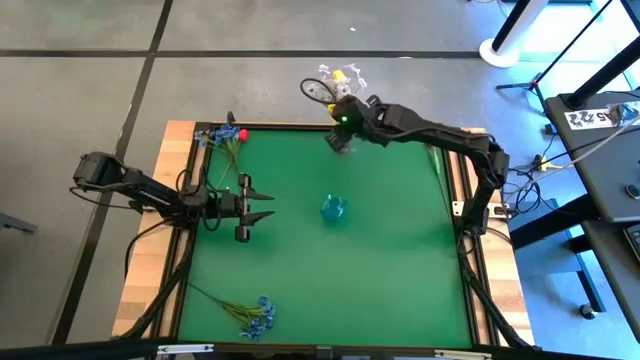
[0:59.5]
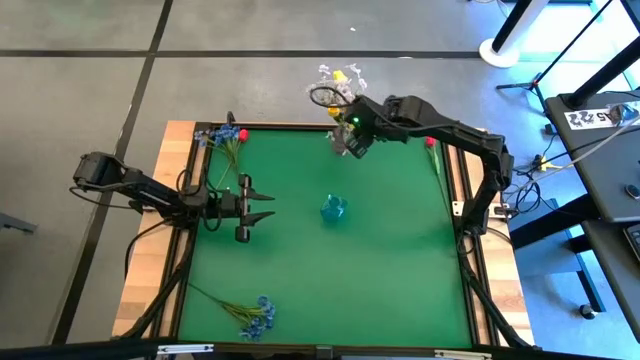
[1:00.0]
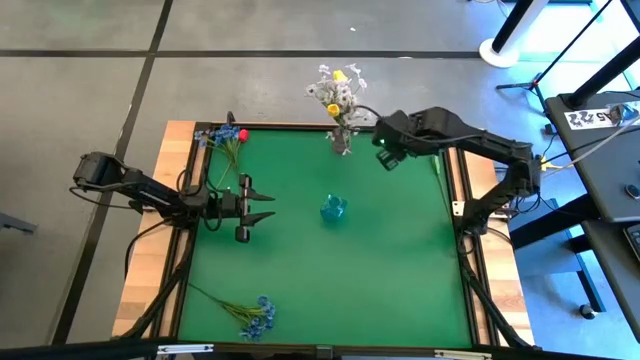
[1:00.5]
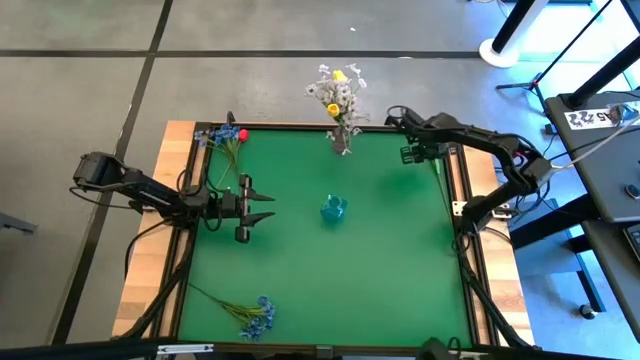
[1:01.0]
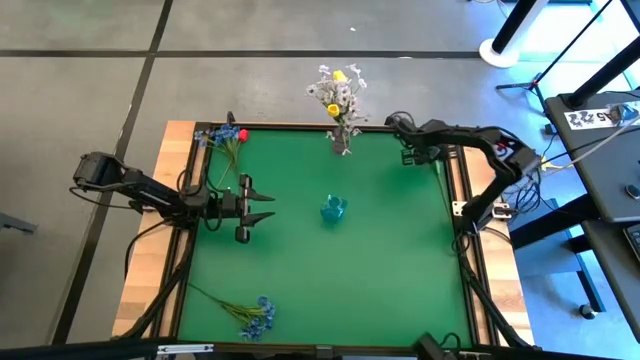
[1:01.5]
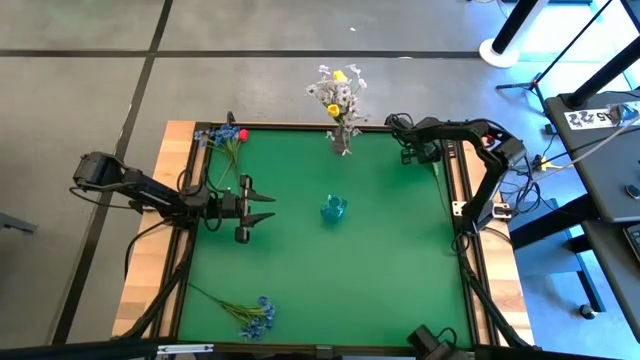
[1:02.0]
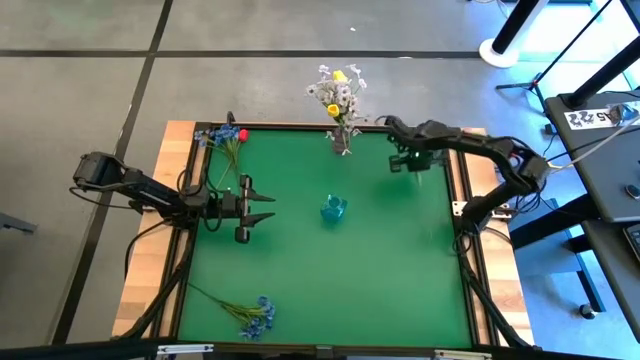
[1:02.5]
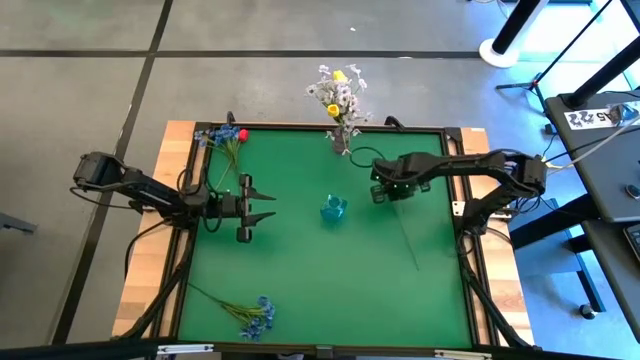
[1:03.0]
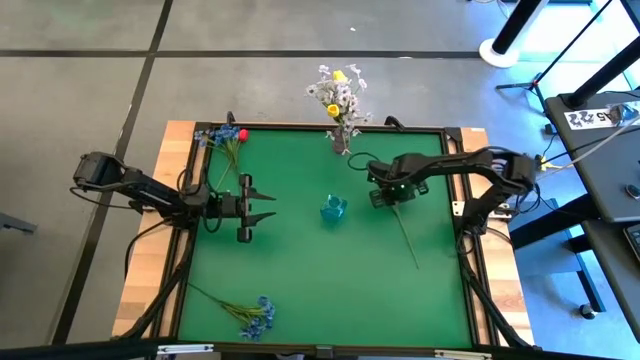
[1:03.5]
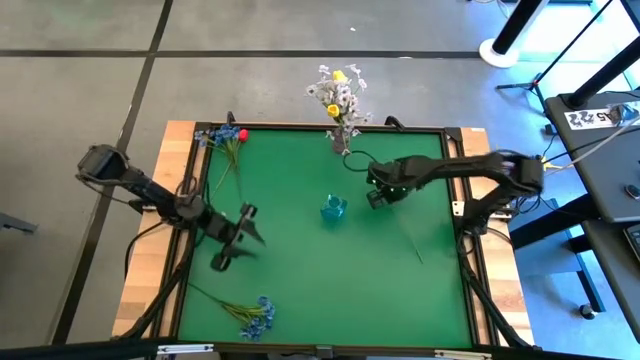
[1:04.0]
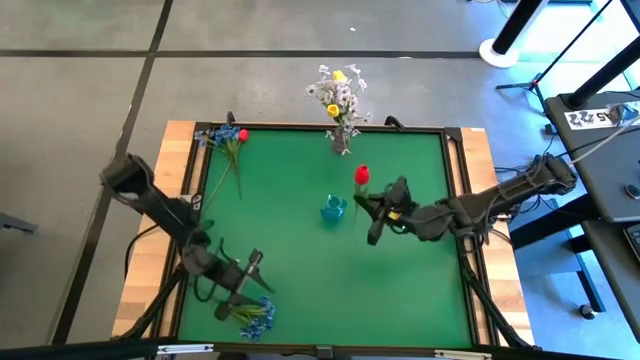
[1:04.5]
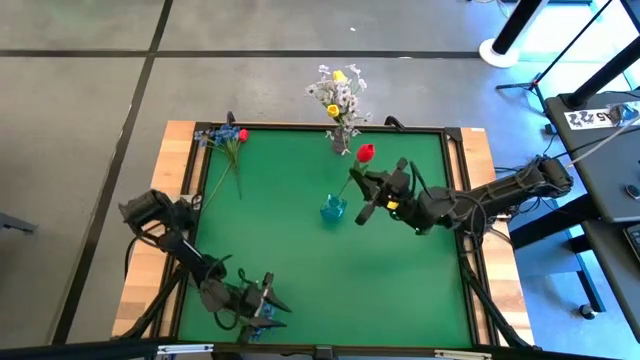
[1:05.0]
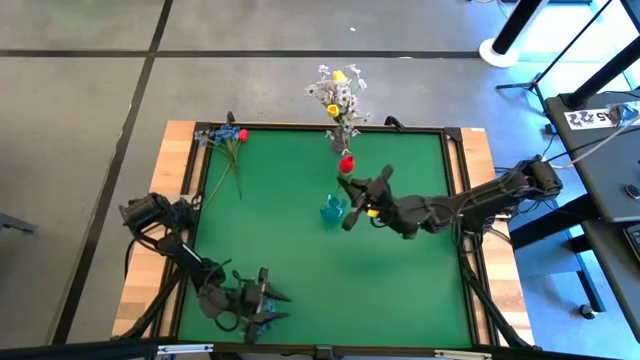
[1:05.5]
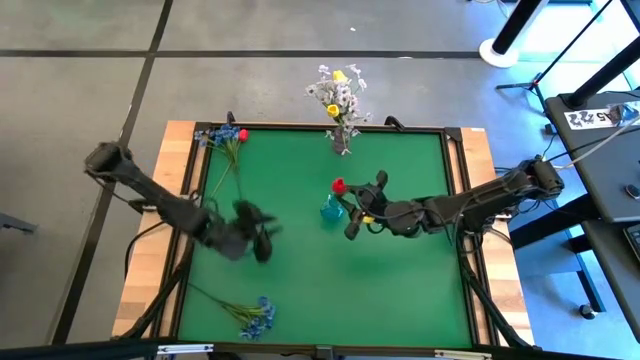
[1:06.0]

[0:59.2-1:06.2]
Task: Sort flowers into vase by color
Put the right red tulip into the blue vase

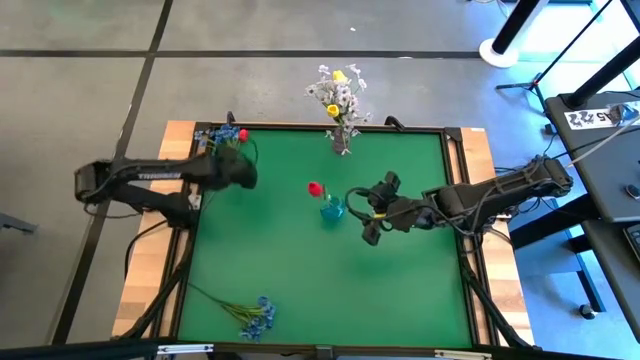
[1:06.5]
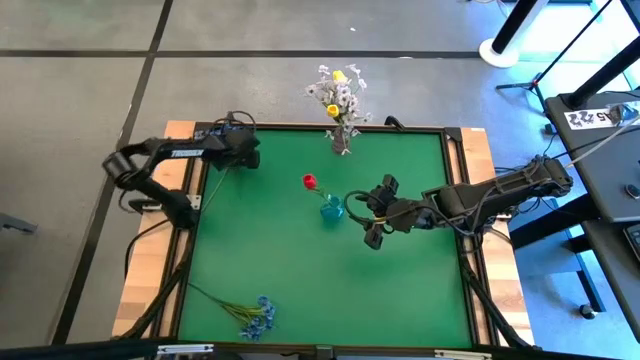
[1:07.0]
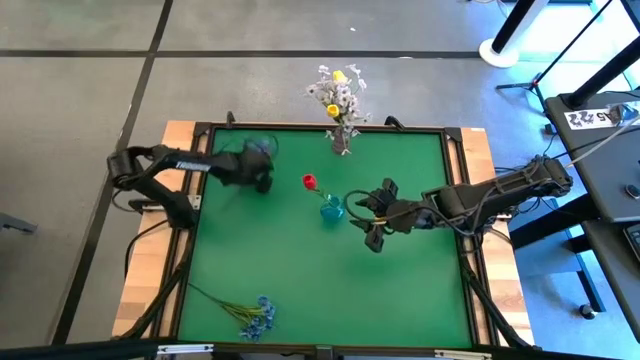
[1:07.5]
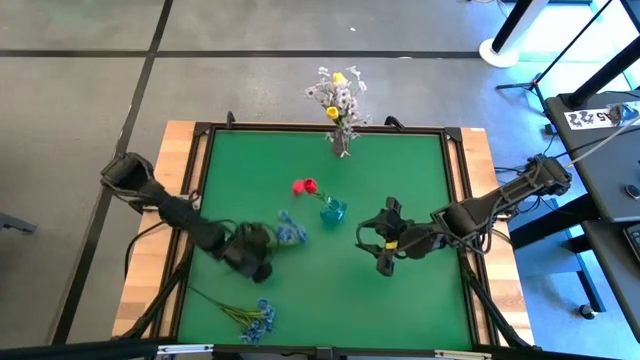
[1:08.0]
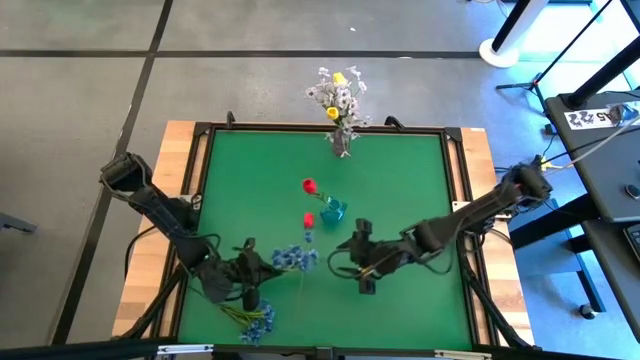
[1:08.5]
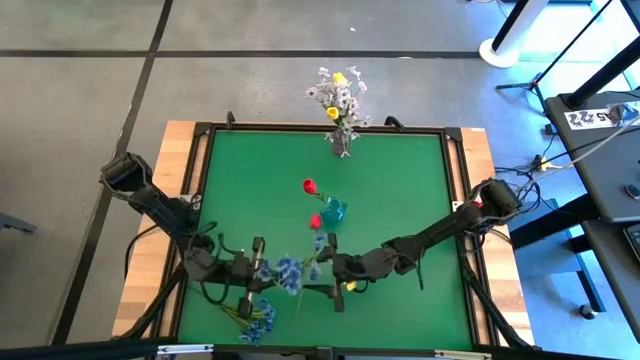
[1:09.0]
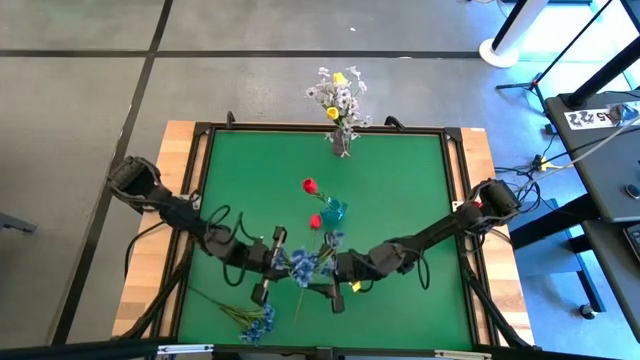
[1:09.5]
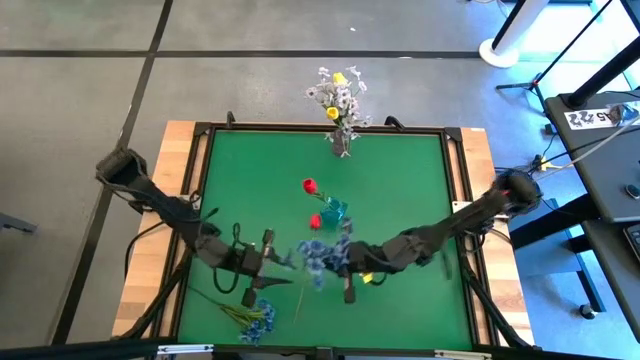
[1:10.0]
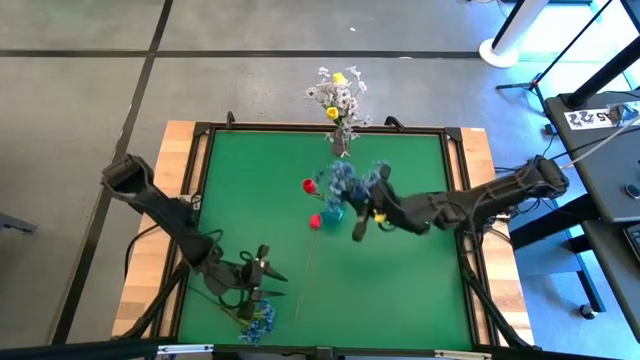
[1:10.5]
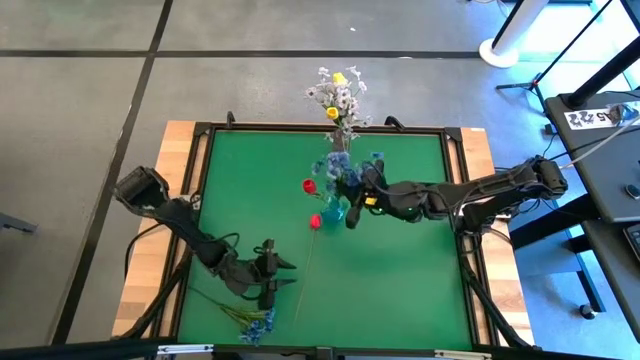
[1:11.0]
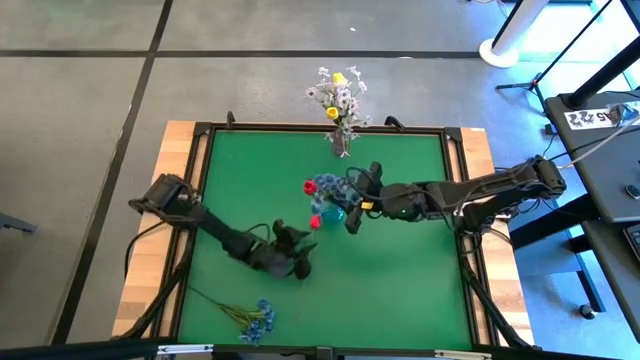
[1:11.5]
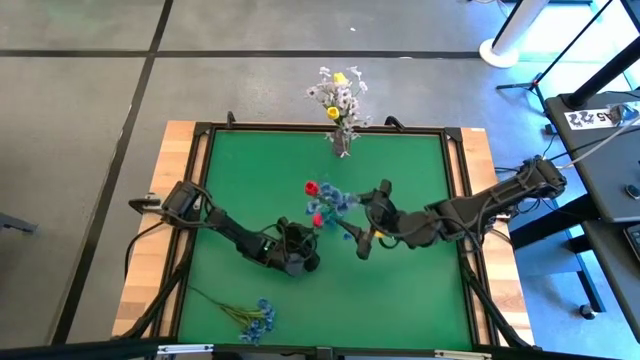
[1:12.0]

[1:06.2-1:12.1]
Put the top blue flower into the blue vase

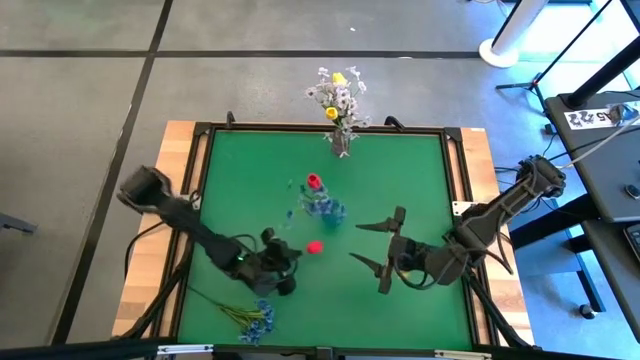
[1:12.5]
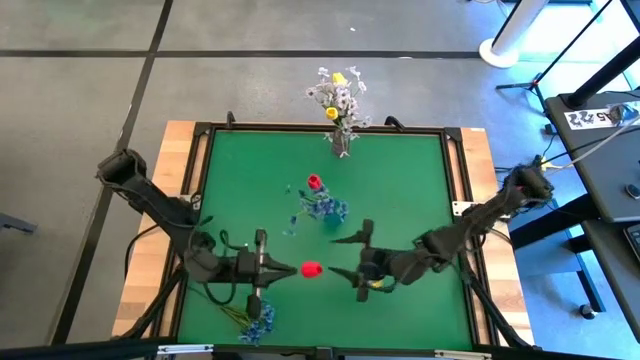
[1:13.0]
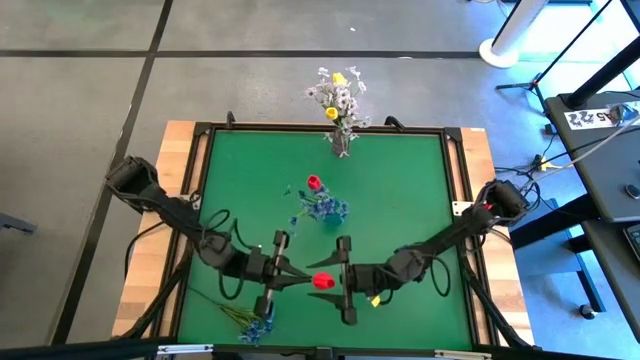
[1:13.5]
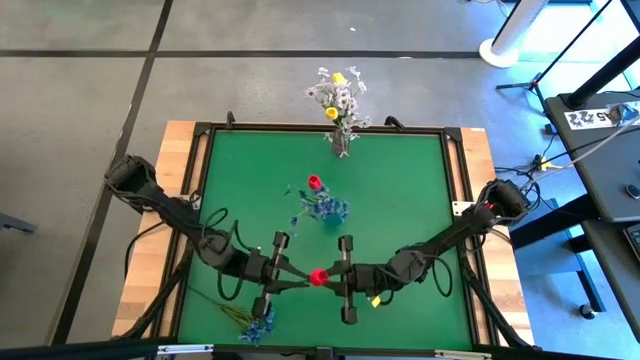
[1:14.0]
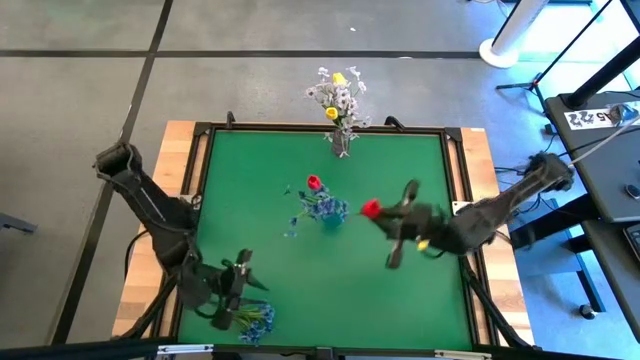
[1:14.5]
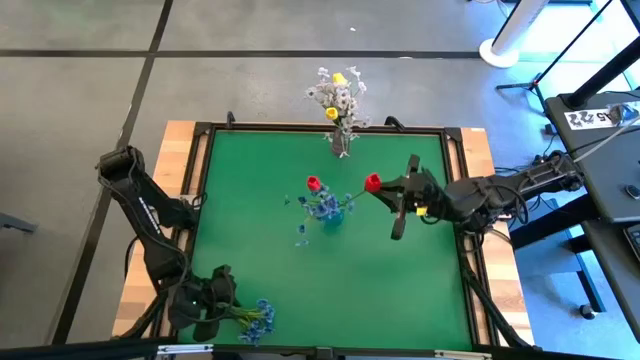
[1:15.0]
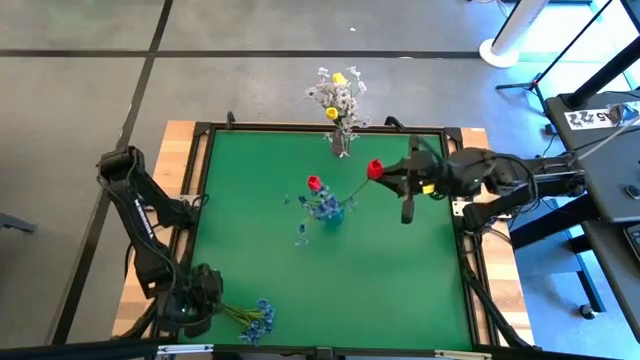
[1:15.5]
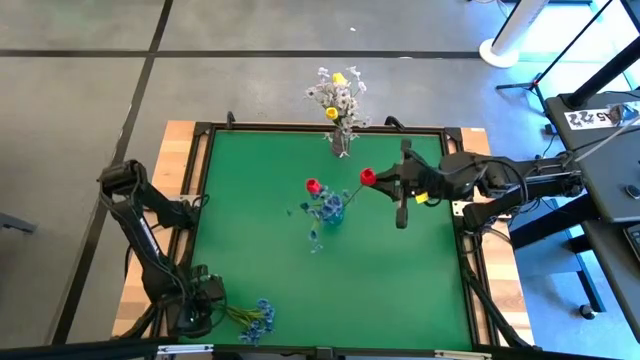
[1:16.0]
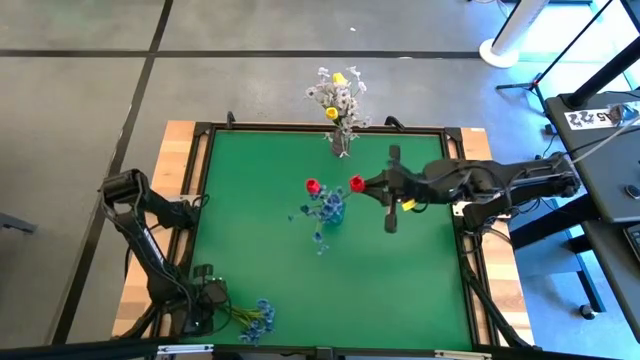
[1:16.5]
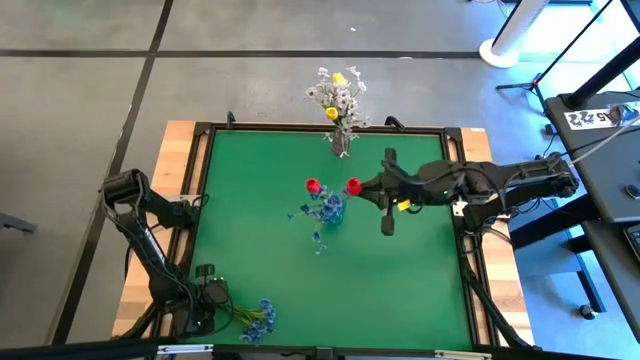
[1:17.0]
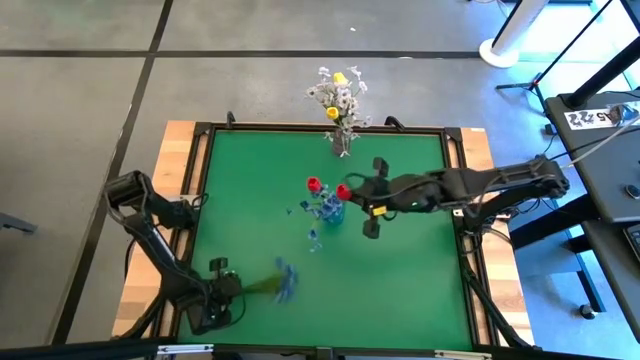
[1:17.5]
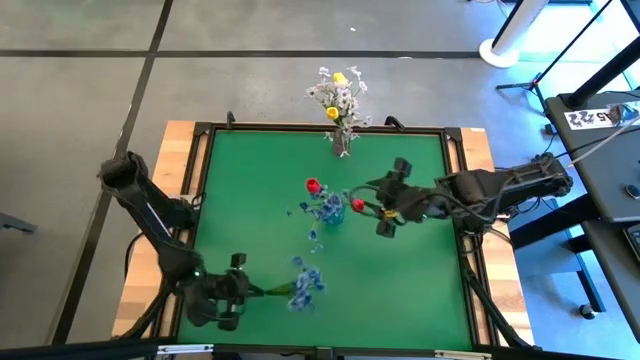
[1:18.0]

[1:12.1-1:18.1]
Put the red tulip into the blue vase

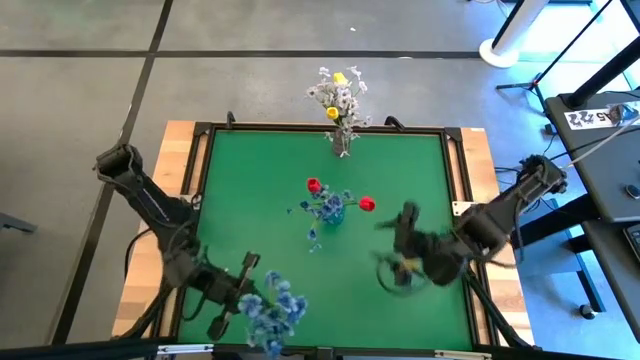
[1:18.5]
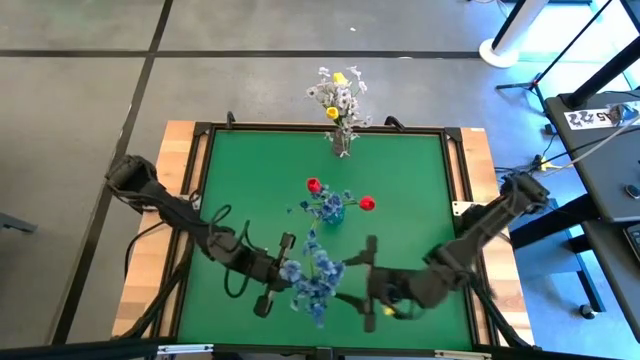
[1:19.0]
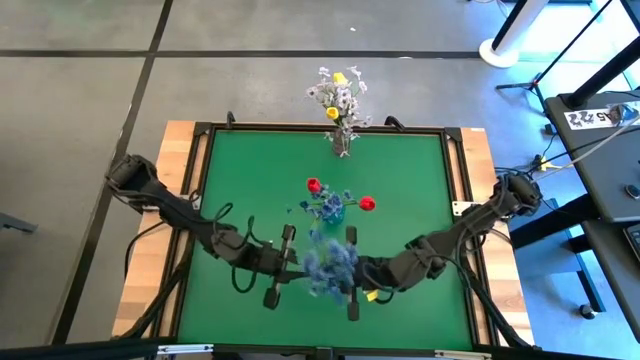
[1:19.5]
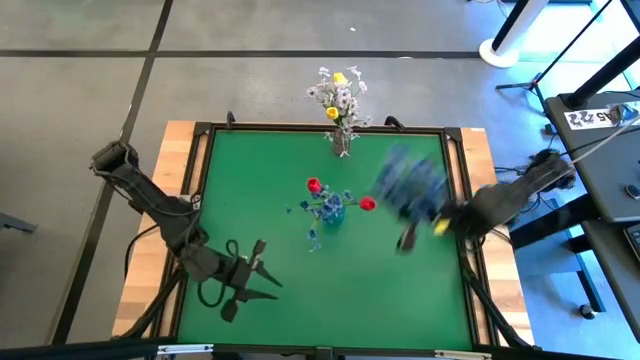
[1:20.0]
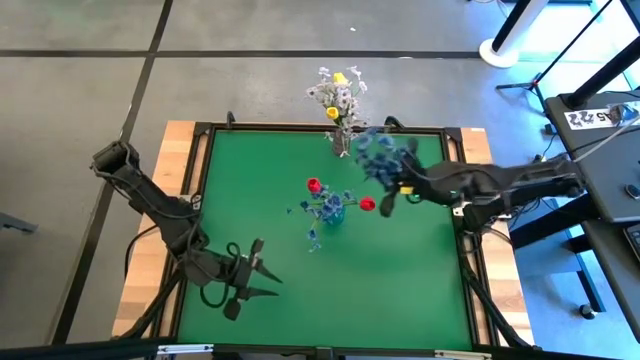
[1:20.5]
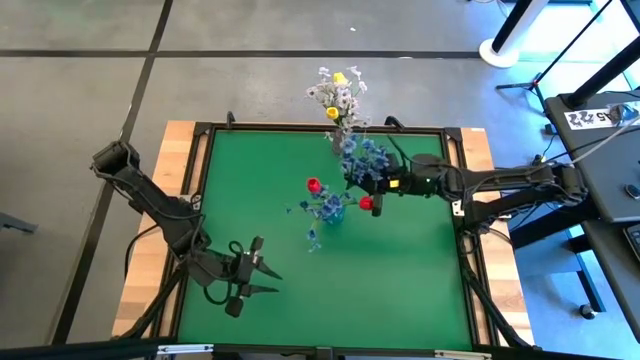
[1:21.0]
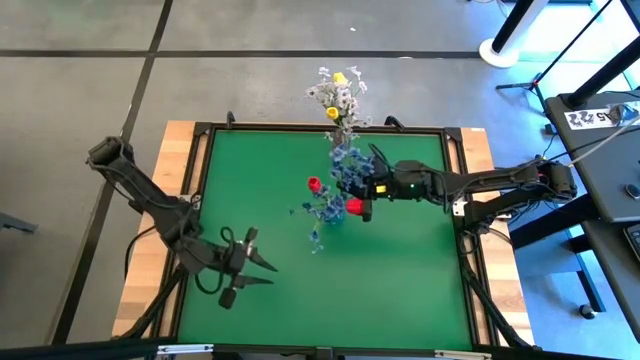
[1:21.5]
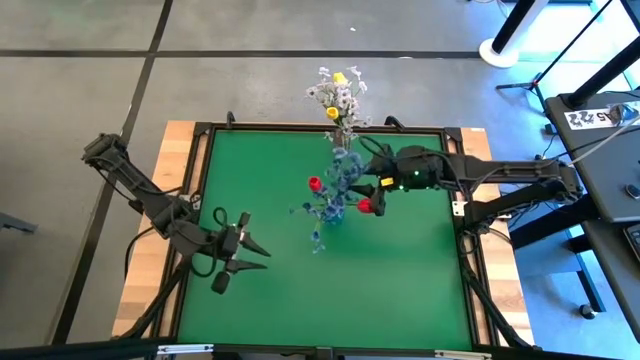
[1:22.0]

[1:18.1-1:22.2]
Put the blue flower into the blue vase
